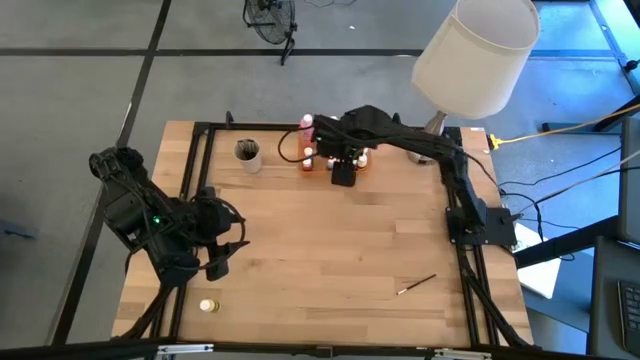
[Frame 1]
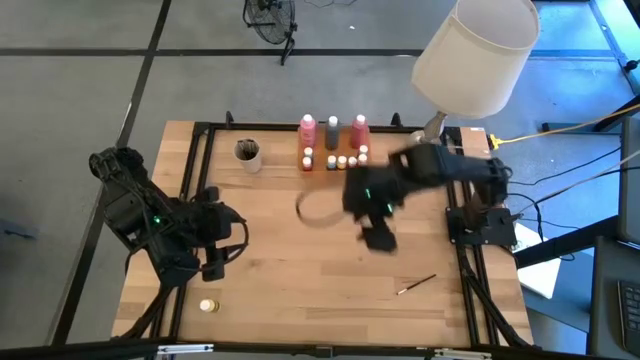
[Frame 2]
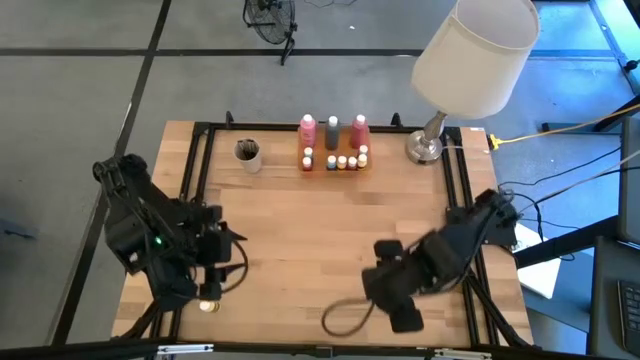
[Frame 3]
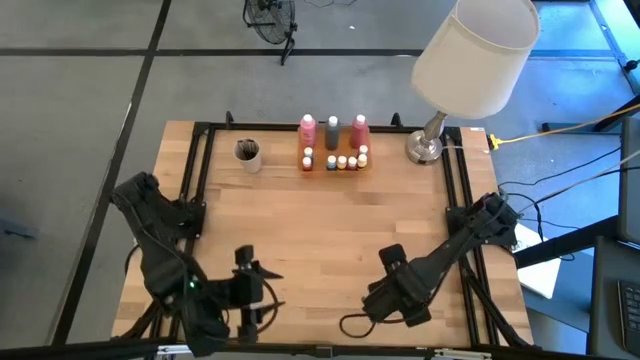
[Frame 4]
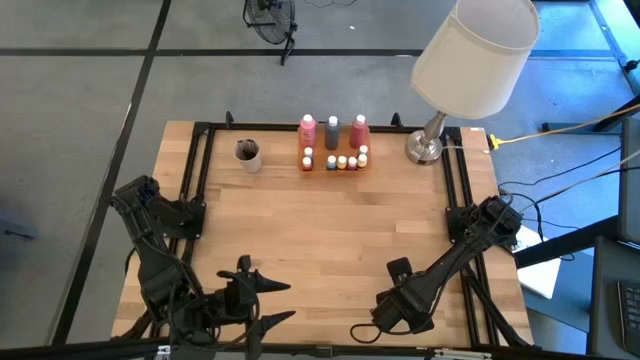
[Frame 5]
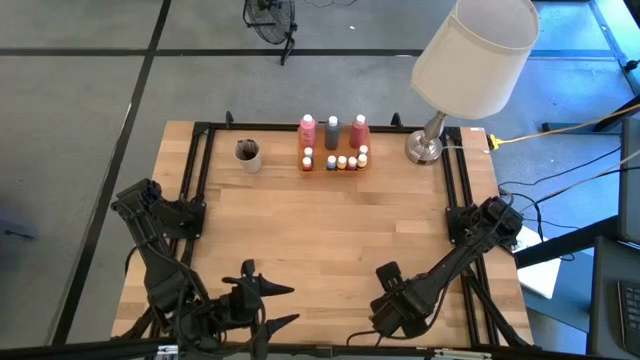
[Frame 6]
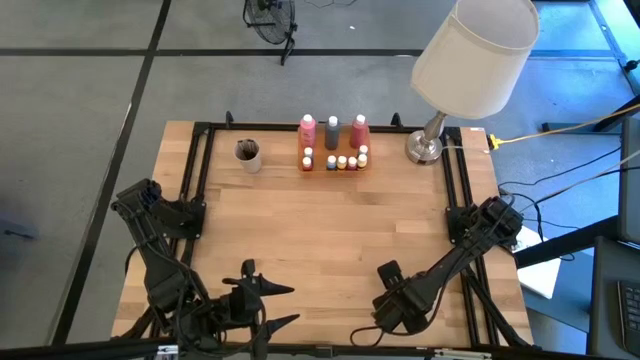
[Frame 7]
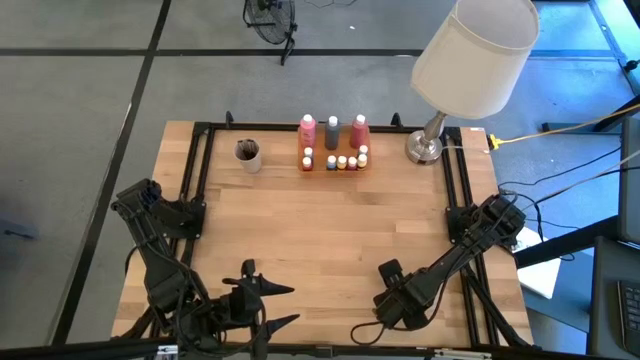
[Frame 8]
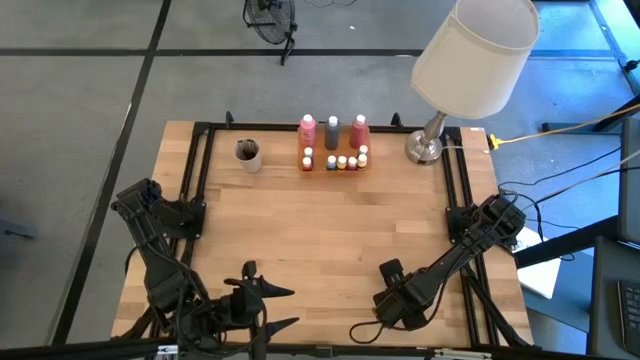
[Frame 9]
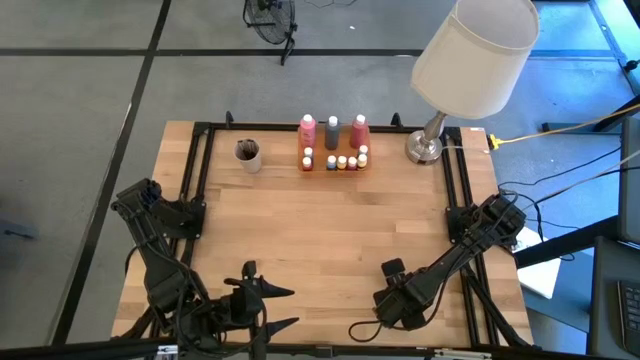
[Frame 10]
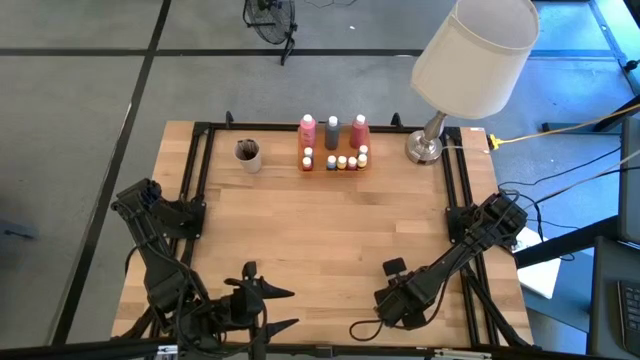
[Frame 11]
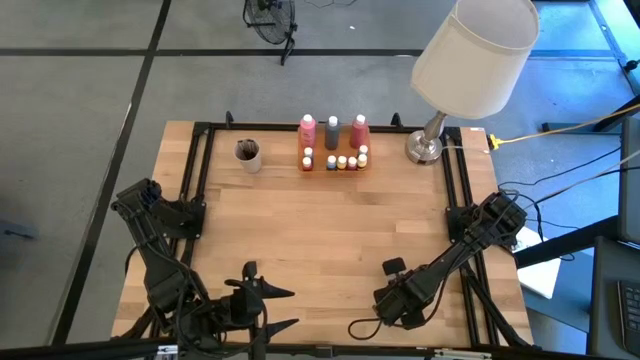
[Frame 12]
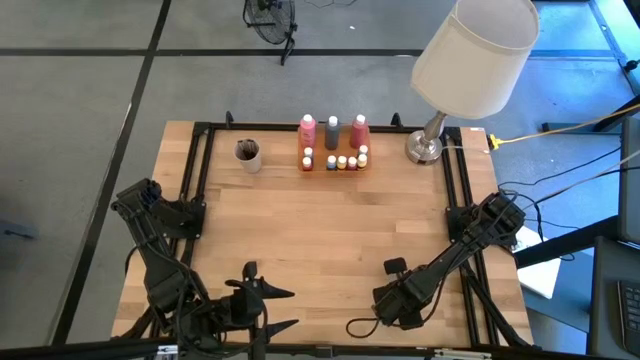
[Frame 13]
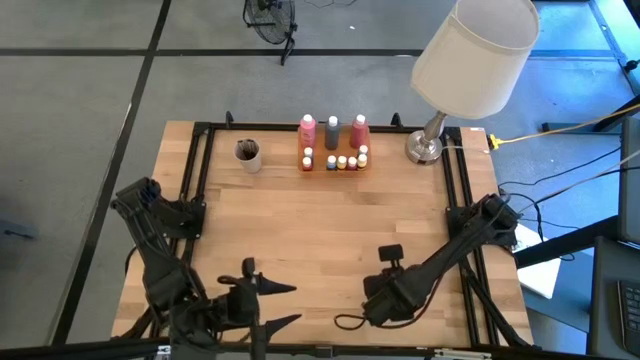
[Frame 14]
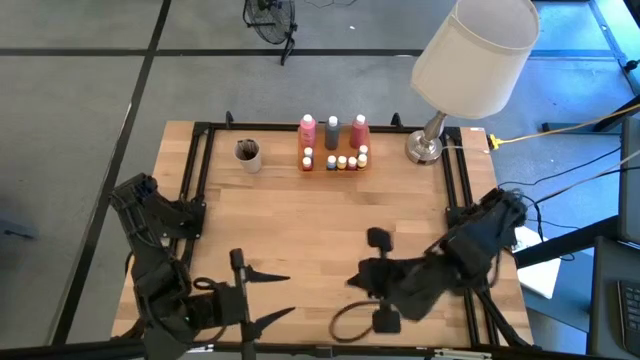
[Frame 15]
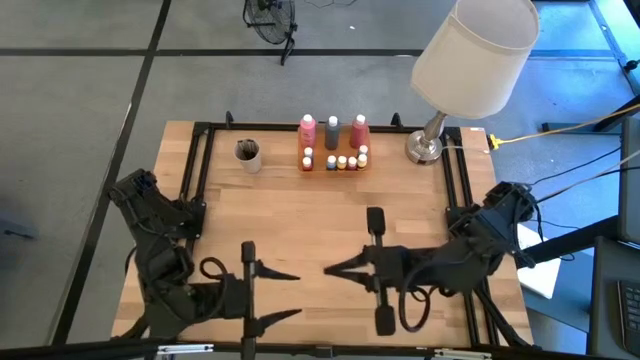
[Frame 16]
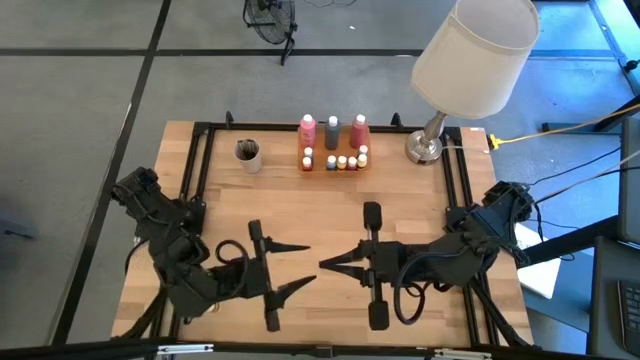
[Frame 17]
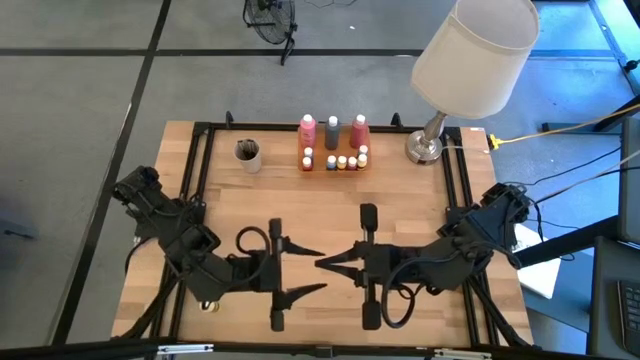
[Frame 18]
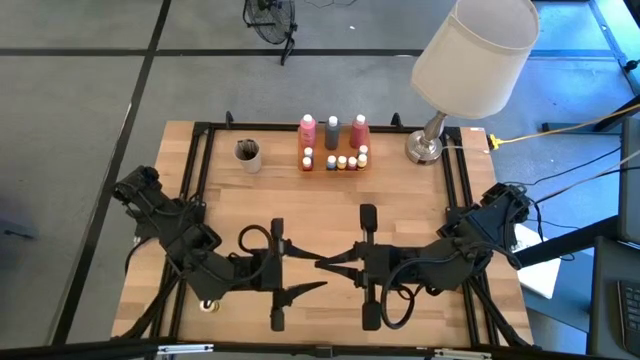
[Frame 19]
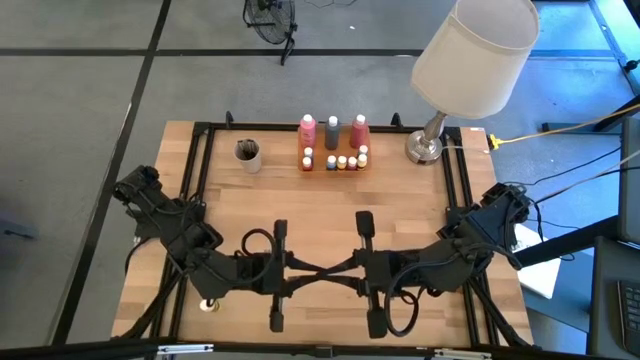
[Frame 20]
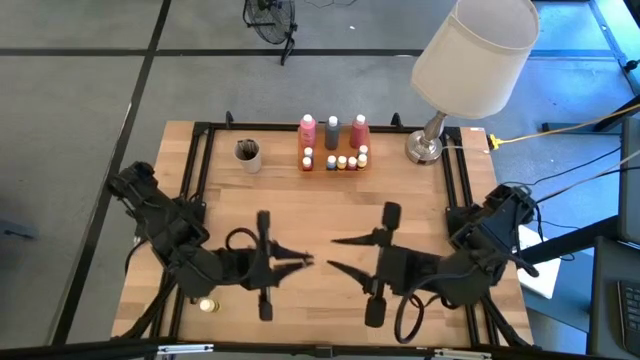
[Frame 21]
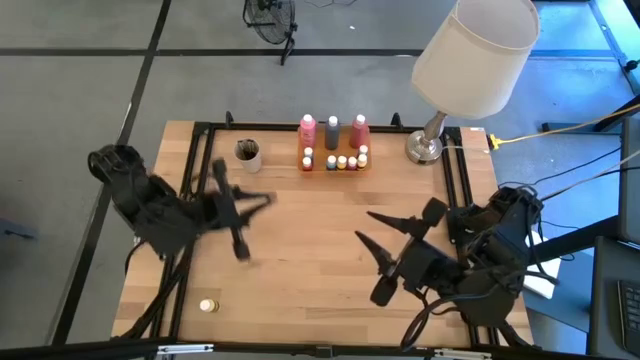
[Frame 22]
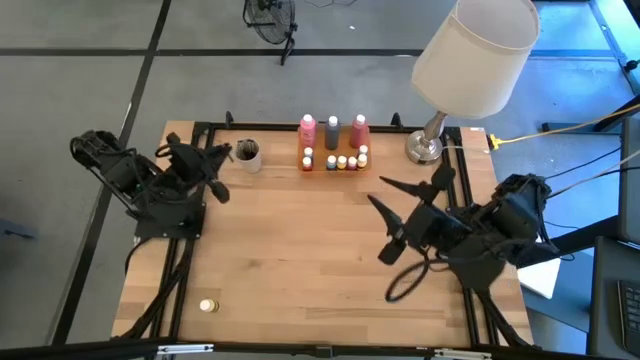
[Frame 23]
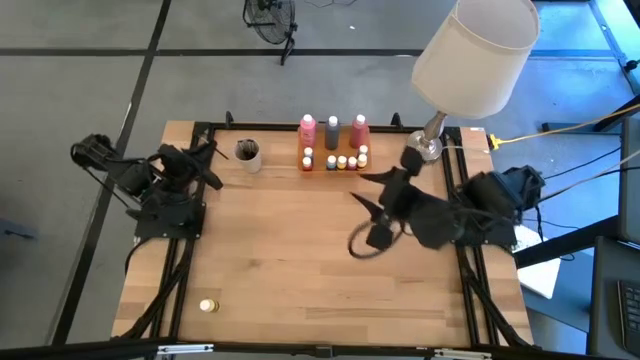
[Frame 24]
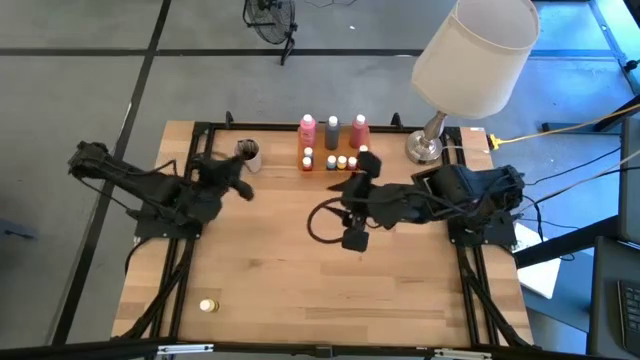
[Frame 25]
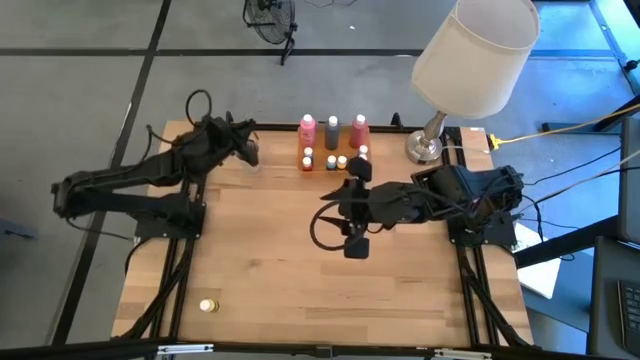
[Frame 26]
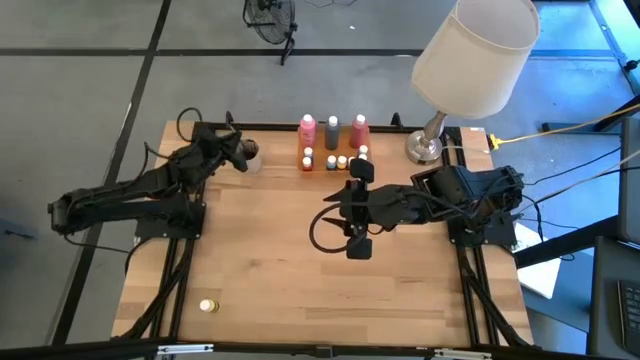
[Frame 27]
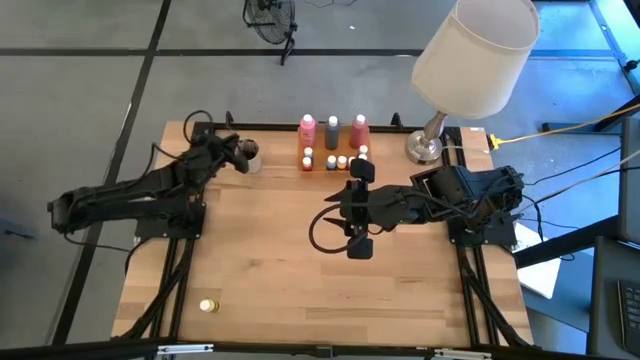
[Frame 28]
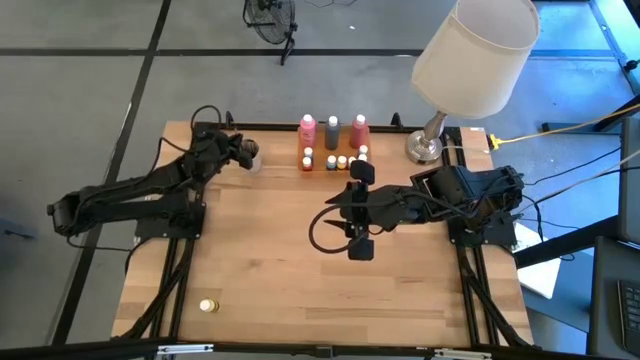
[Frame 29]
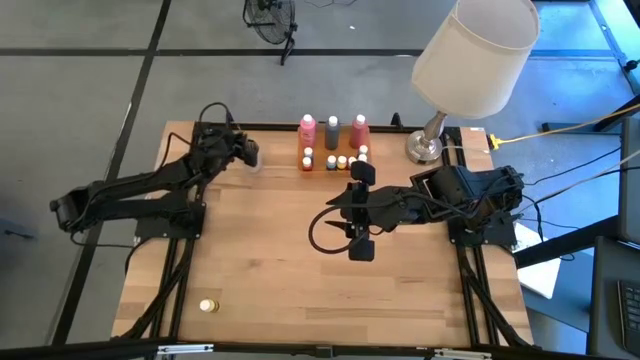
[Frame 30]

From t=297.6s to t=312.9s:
Task: Pick & Place Paint Supplies
Put the silver paint brush into the white cup
